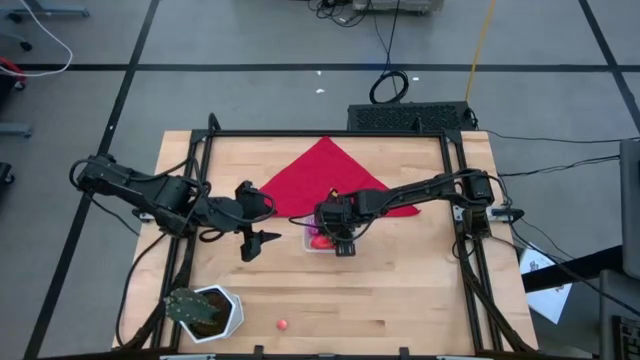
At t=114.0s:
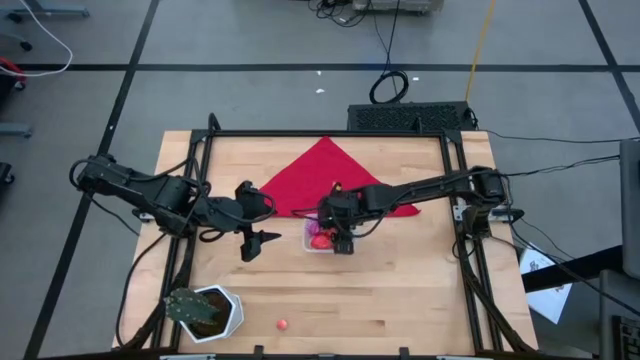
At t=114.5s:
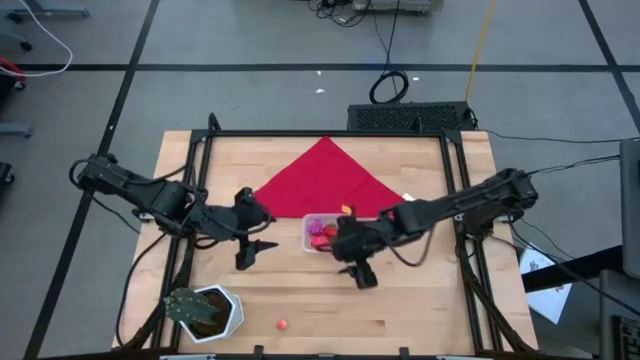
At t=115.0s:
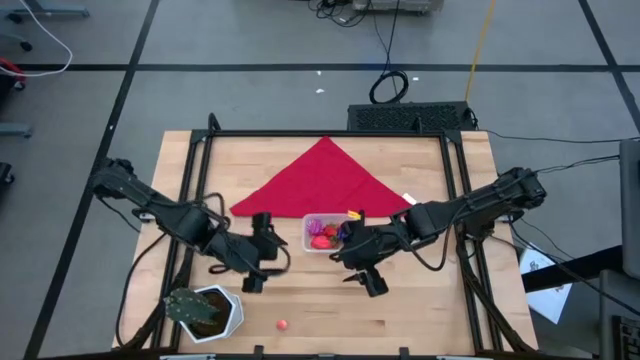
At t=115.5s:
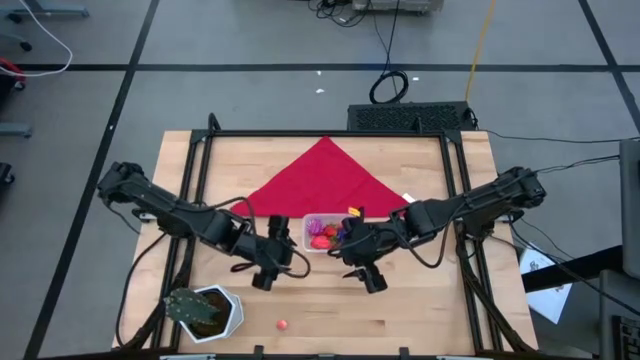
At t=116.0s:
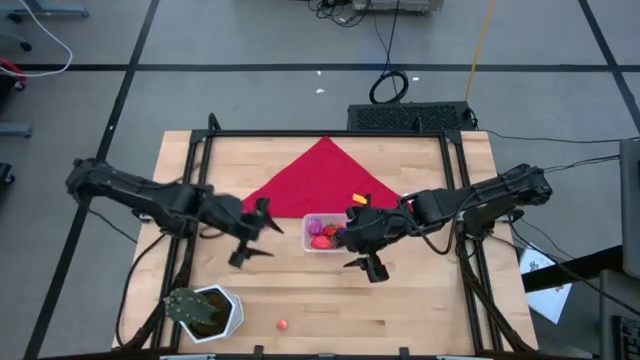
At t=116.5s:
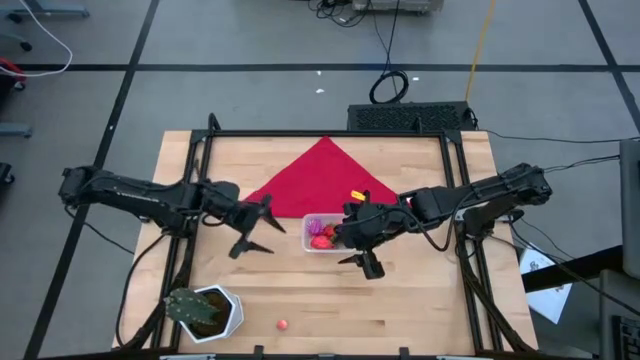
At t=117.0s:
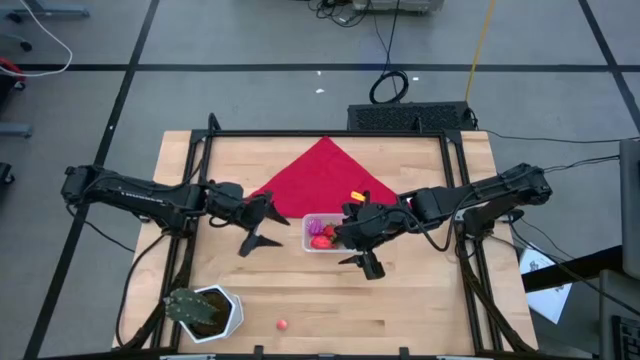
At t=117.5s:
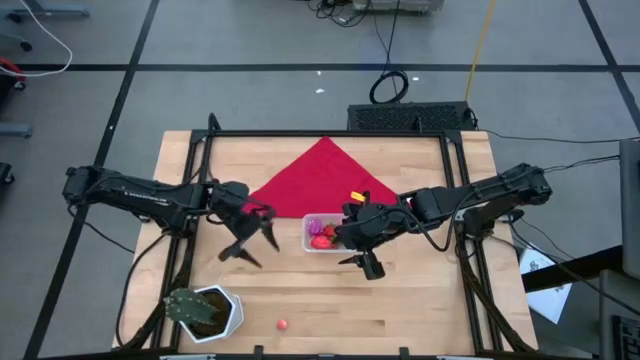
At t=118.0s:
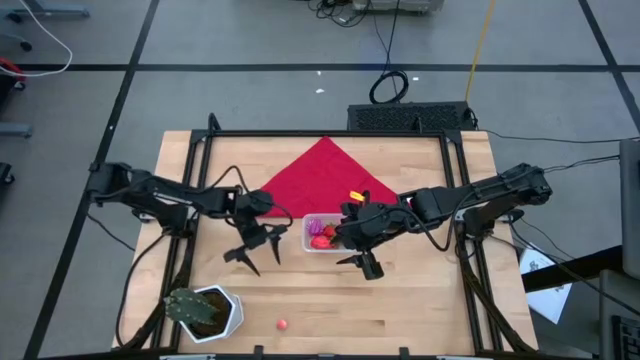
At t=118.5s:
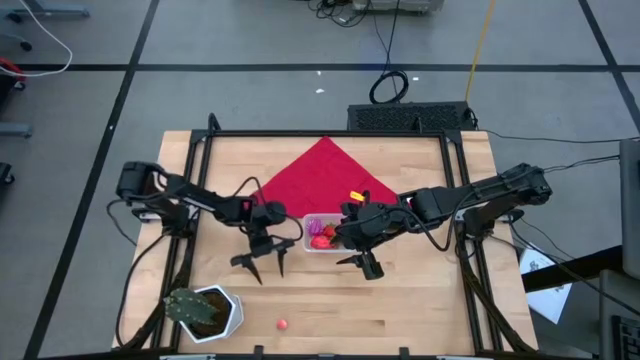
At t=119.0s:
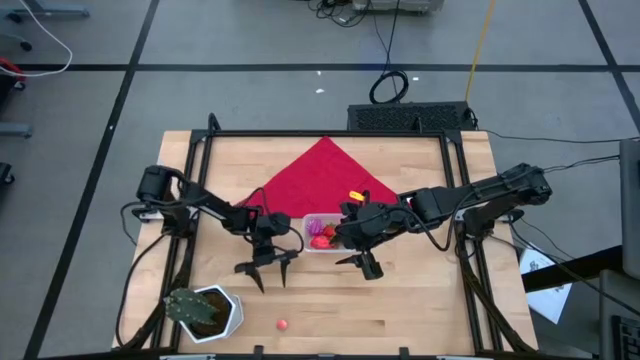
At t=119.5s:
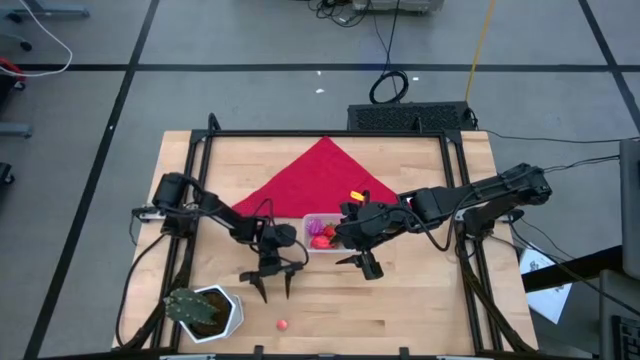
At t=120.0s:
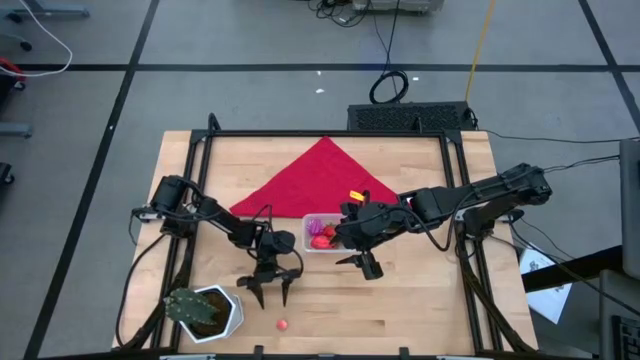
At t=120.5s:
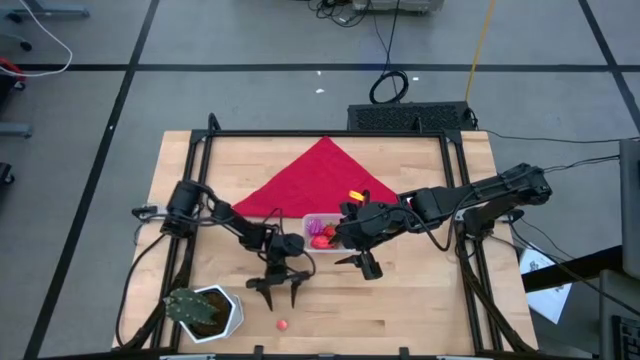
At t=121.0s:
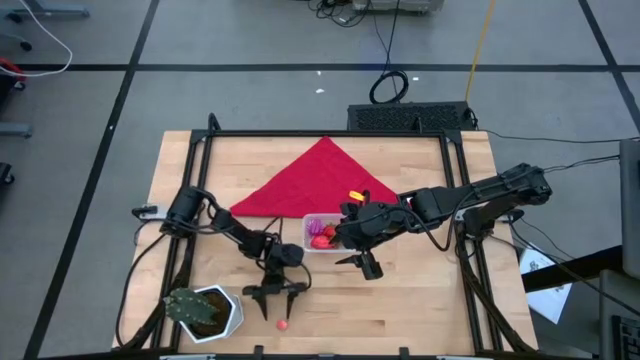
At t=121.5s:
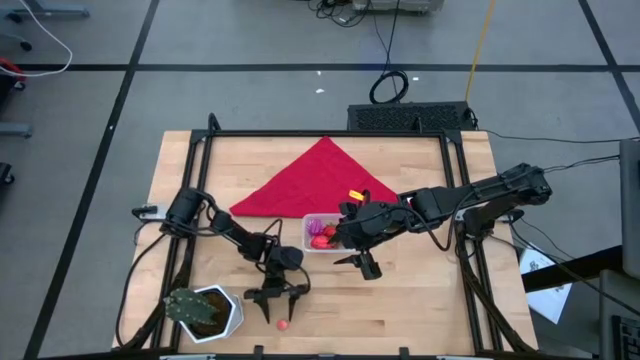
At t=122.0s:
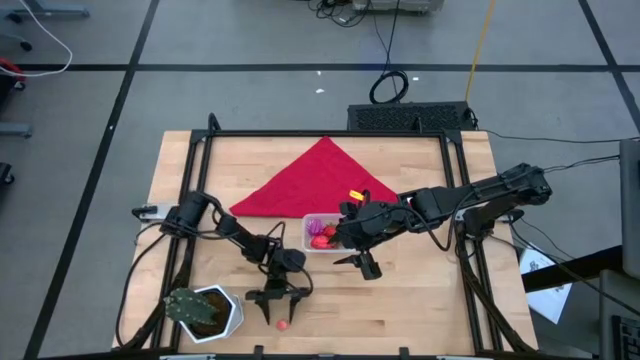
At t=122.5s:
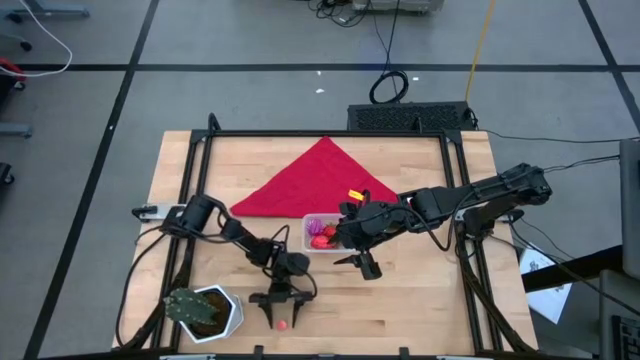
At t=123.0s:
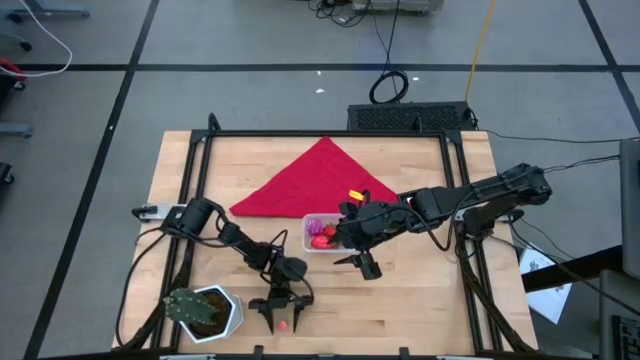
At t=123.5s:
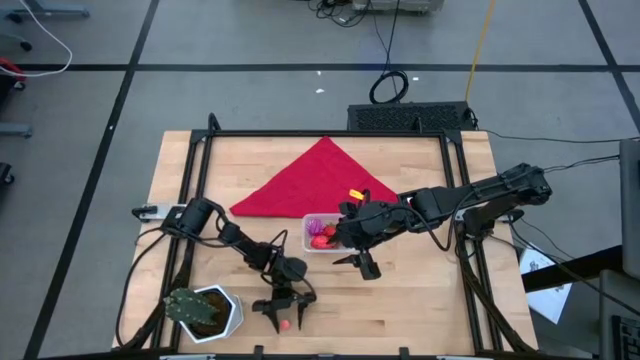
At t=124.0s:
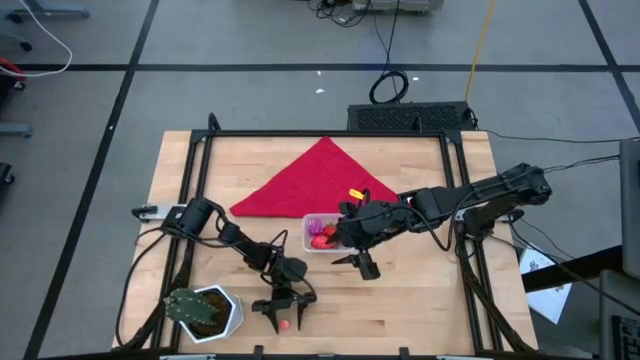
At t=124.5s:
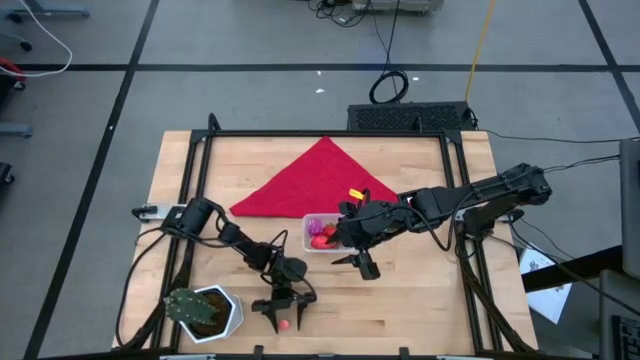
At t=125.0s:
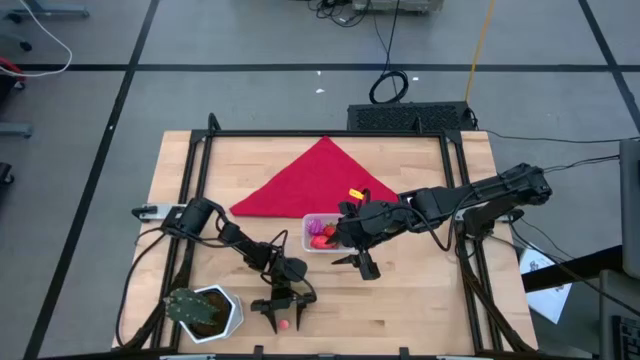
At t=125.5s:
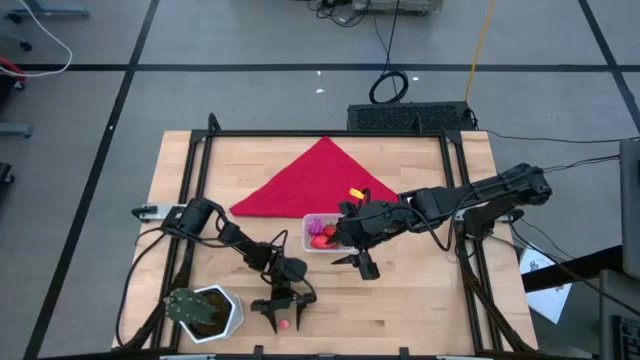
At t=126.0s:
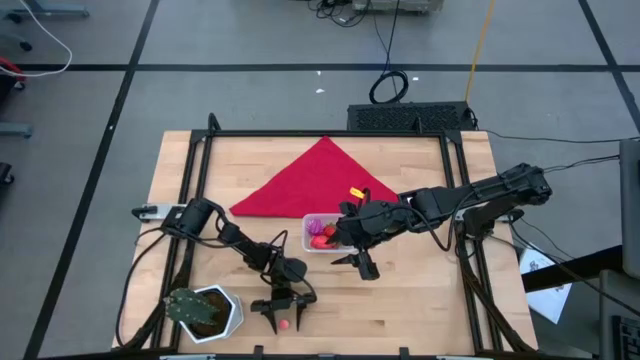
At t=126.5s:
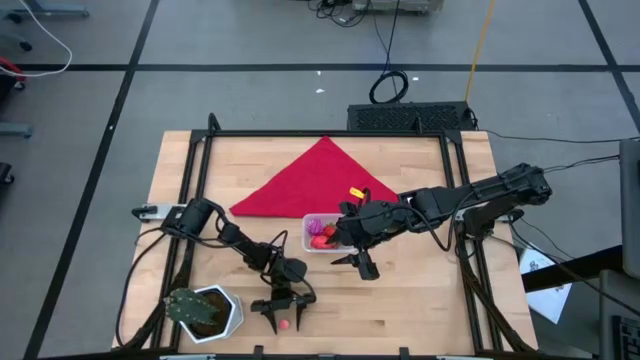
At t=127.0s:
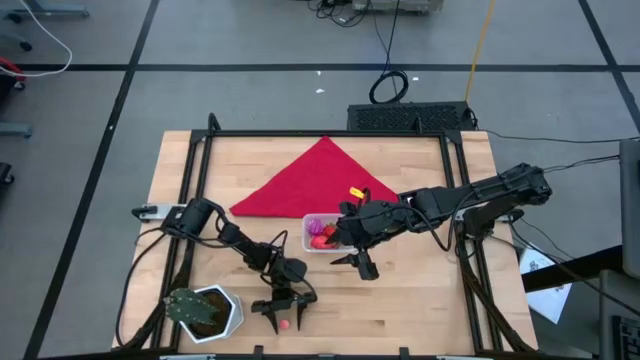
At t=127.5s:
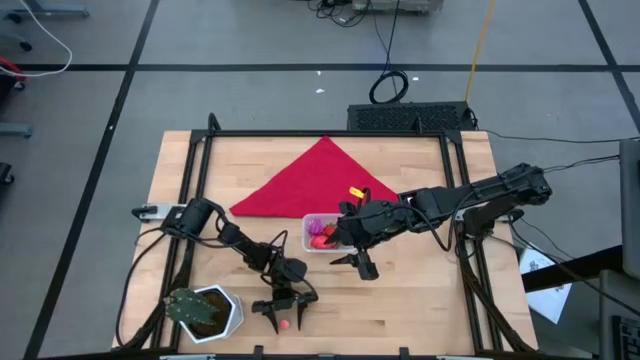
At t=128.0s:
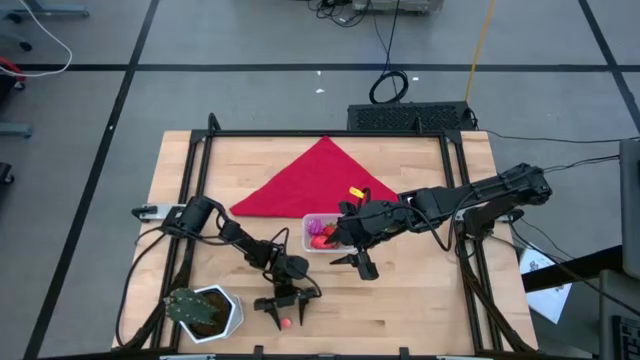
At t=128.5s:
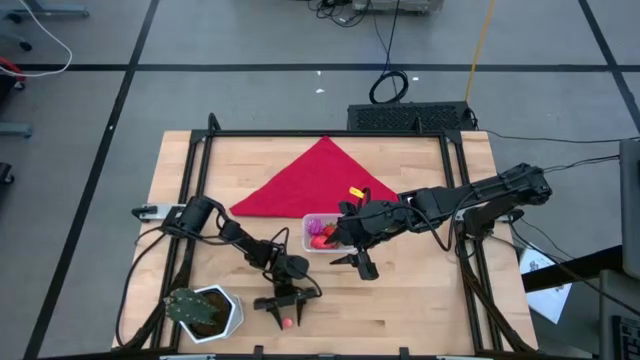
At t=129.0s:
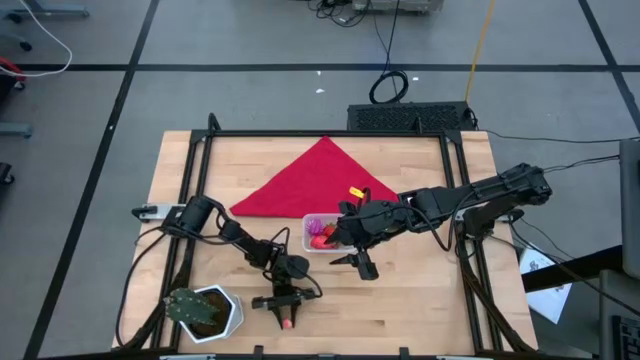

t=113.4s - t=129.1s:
Task: Pick and placing Produce into tupperware
Put the pink peach in the transparent bin

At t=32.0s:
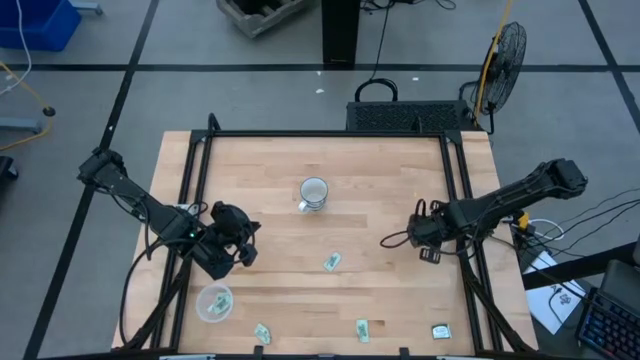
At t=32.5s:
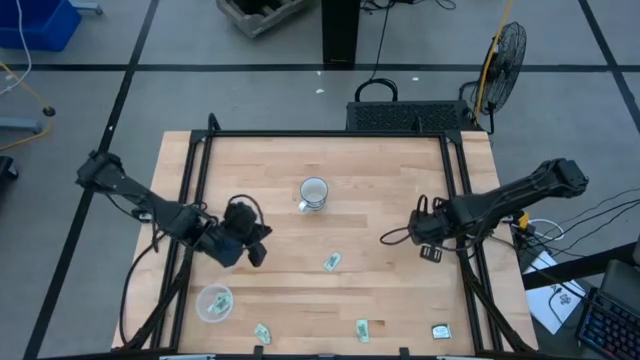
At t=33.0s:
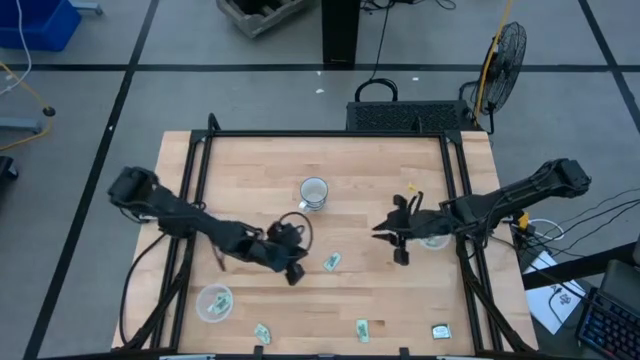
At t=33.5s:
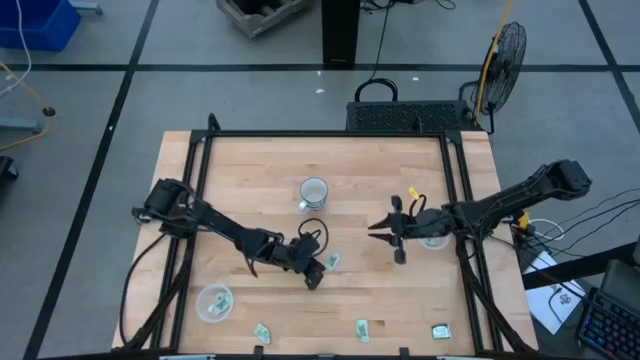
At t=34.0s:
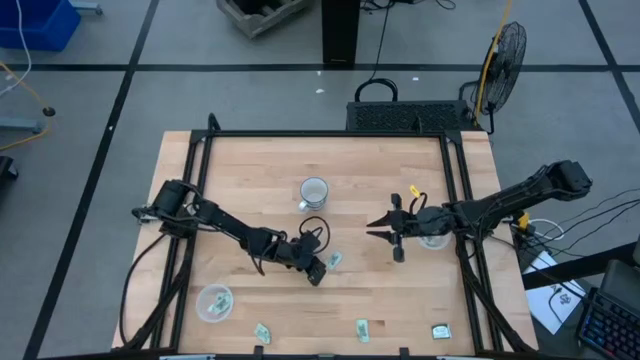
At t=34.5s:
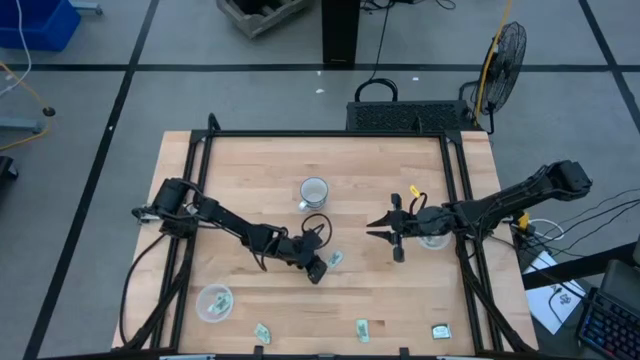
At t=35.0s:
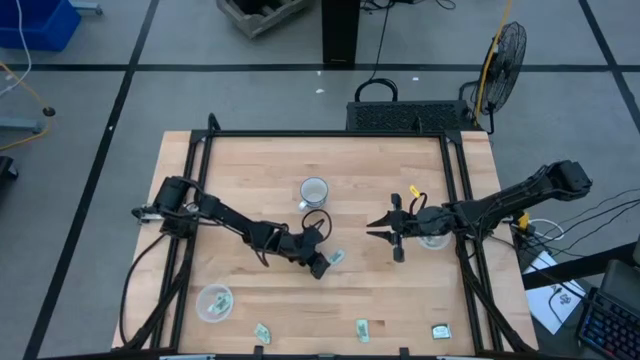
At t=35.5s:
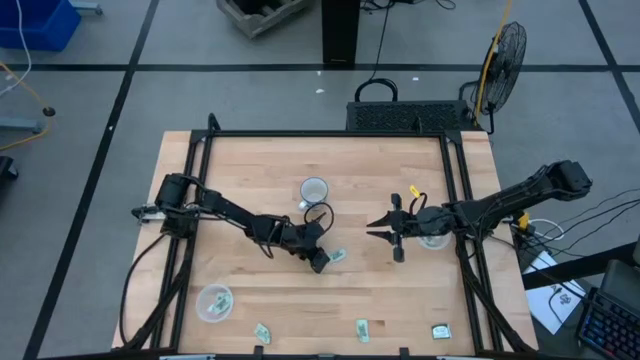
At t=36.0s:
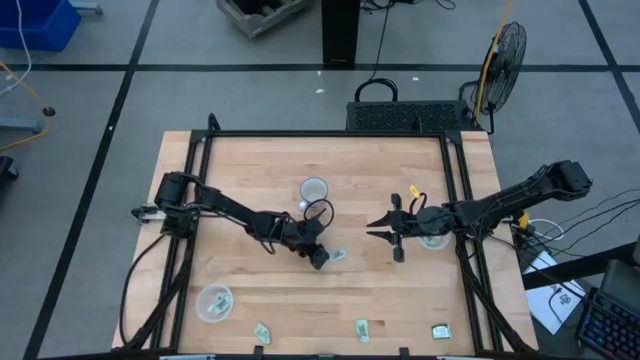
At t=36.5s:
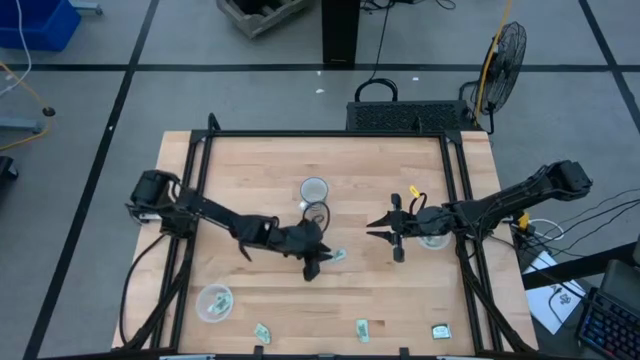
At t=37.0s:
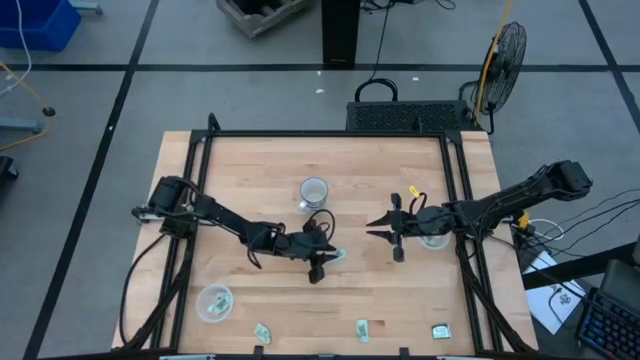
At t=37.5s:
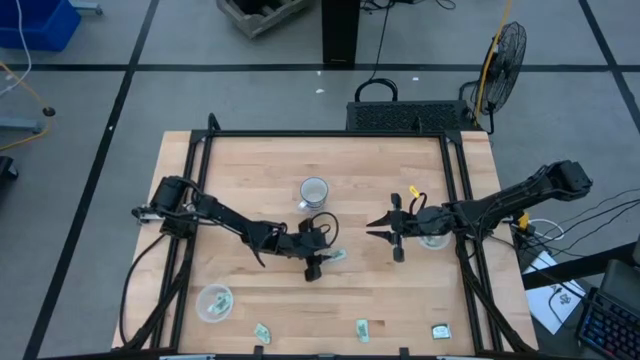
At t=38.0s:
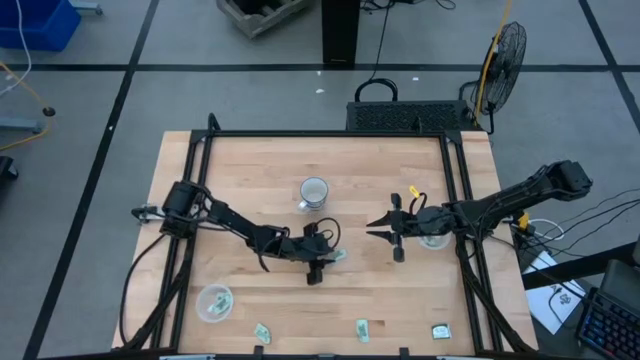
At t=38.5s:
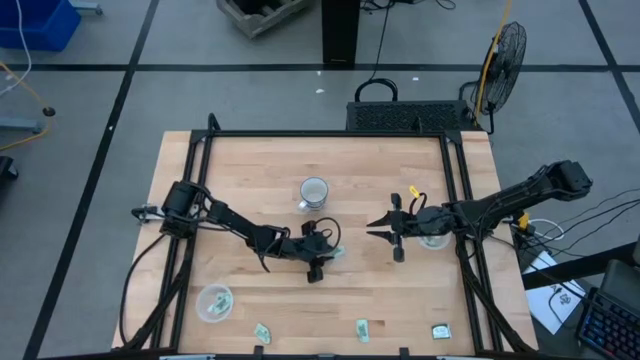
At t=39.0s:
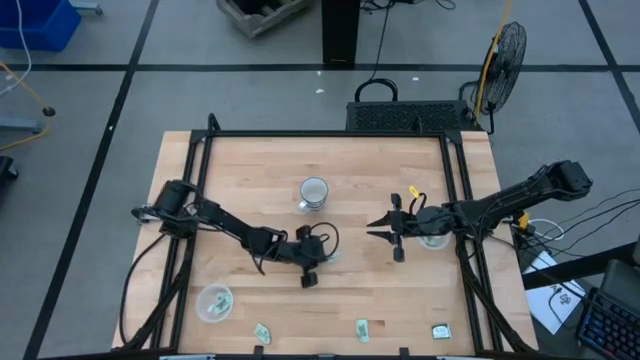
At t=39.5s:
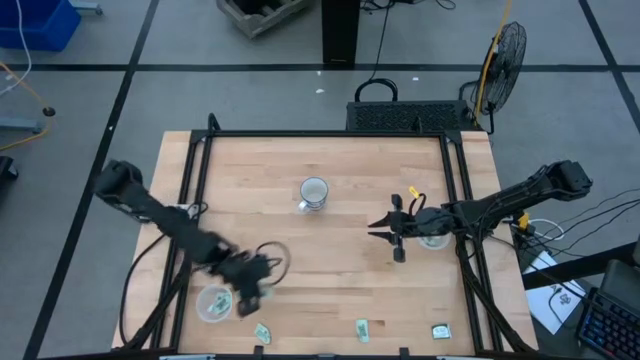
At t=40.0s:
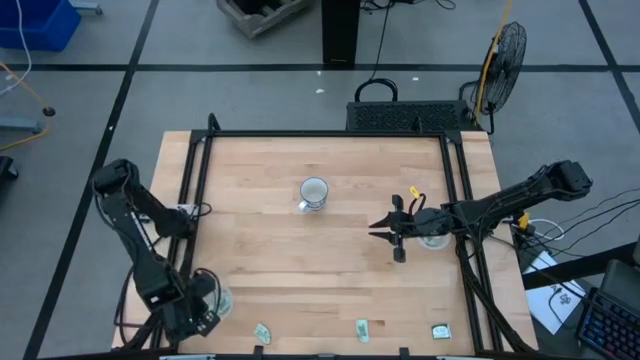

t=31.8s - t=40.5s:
Task: Pick and place Stevia / Truvia into bins
Put the green stevia packet into the left transparent container
